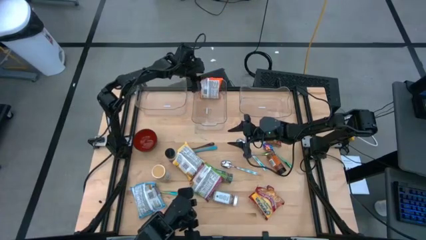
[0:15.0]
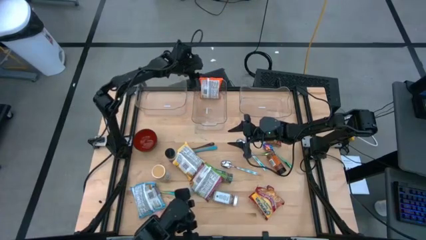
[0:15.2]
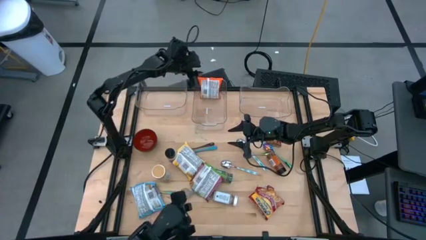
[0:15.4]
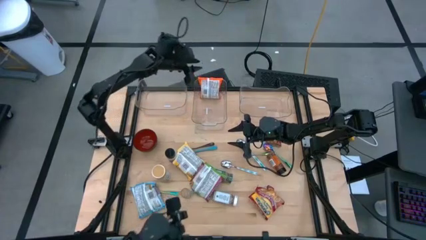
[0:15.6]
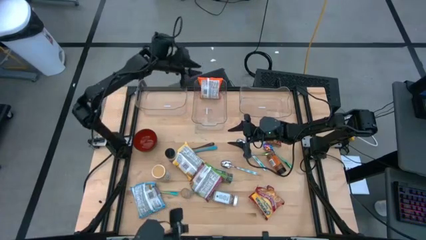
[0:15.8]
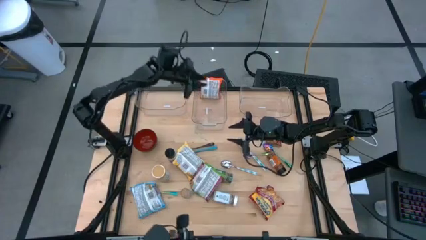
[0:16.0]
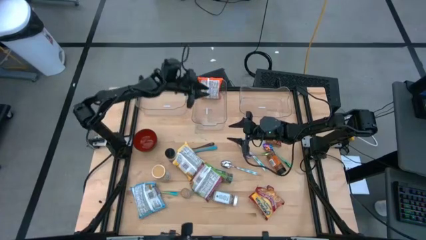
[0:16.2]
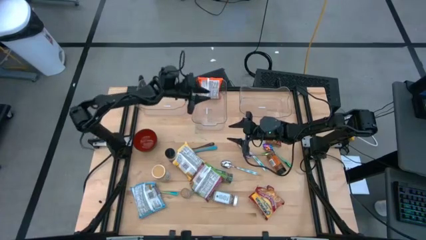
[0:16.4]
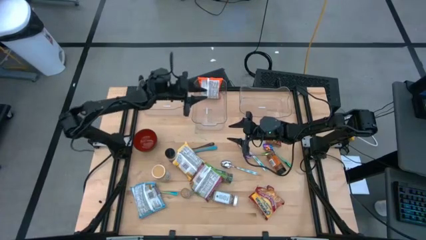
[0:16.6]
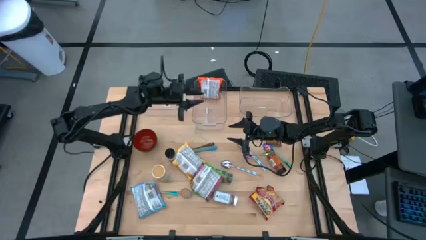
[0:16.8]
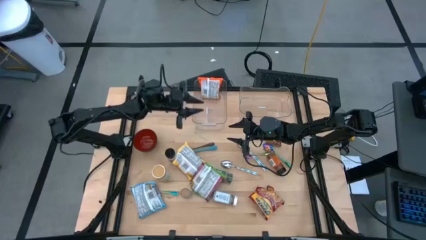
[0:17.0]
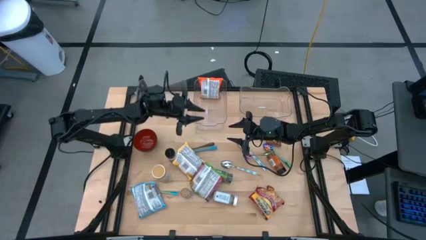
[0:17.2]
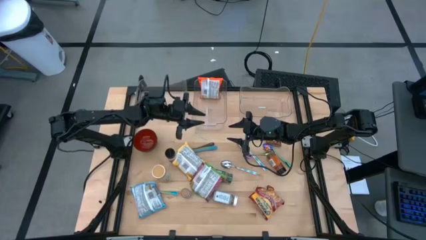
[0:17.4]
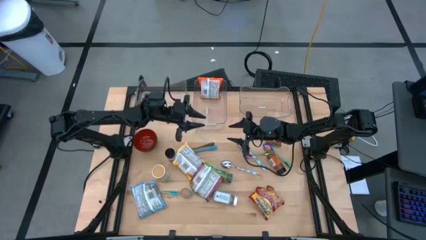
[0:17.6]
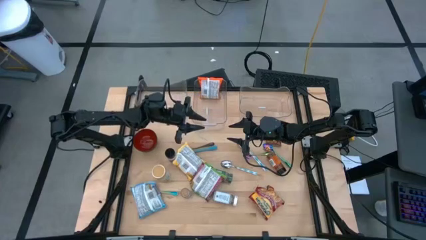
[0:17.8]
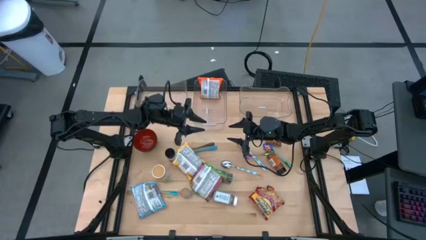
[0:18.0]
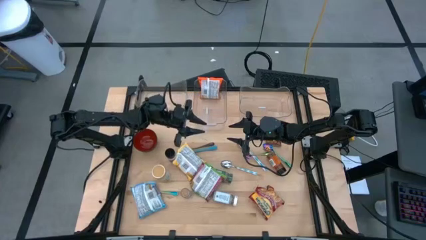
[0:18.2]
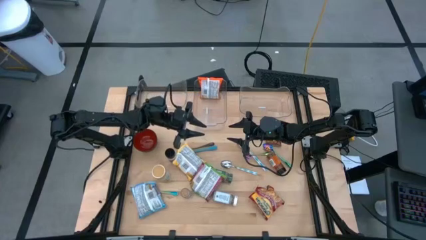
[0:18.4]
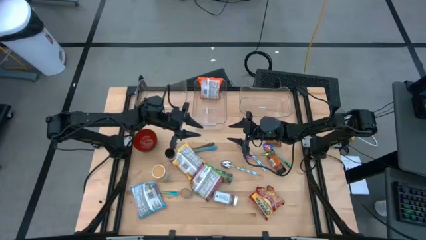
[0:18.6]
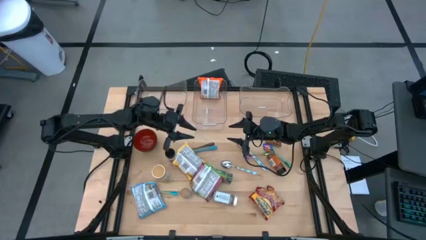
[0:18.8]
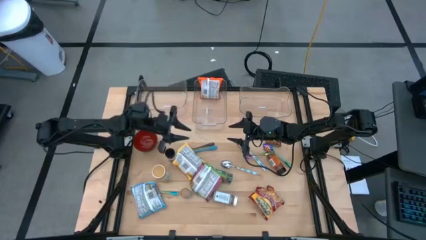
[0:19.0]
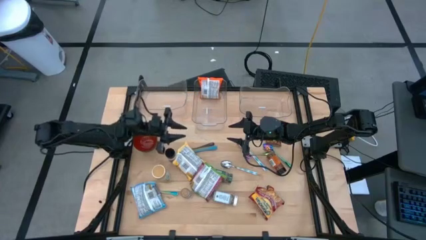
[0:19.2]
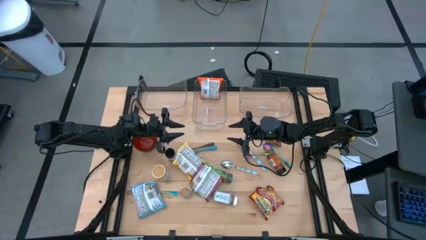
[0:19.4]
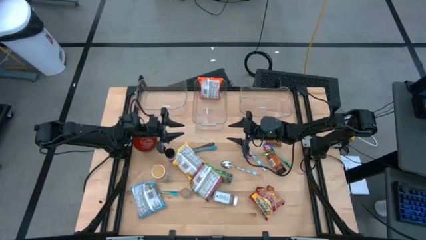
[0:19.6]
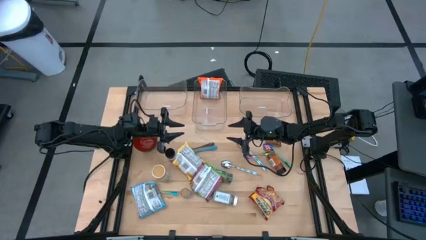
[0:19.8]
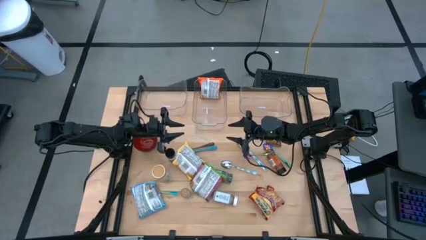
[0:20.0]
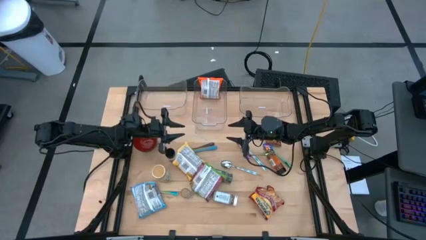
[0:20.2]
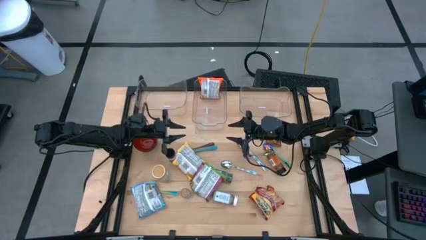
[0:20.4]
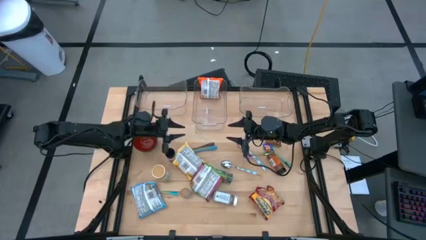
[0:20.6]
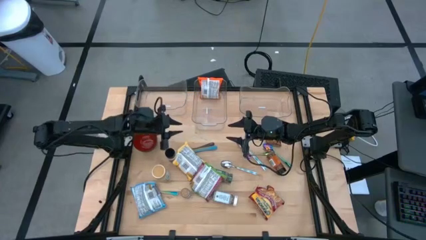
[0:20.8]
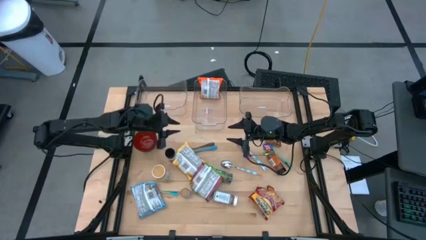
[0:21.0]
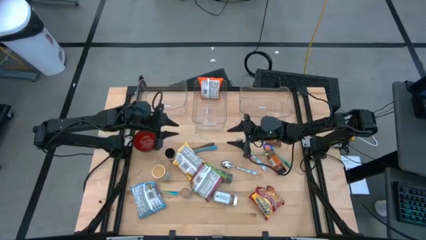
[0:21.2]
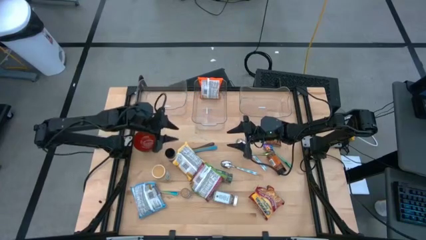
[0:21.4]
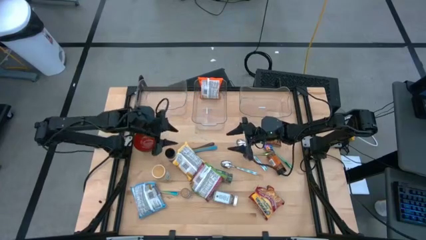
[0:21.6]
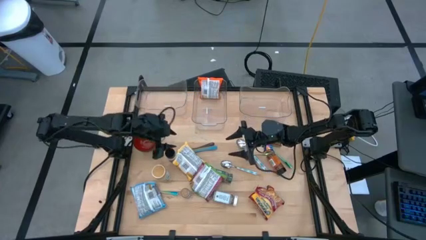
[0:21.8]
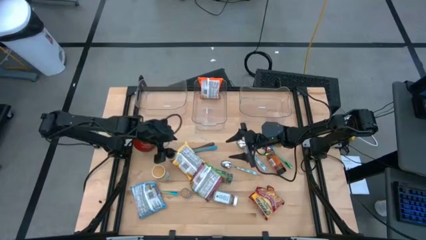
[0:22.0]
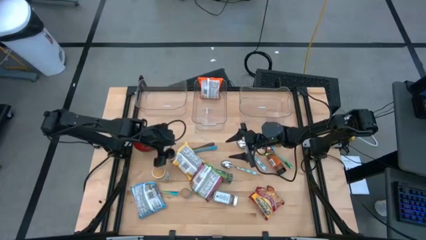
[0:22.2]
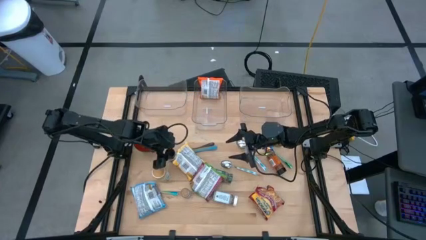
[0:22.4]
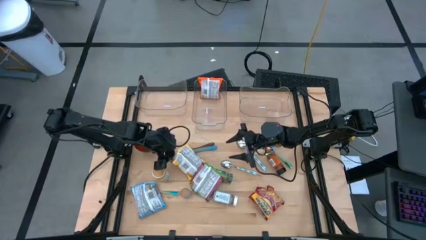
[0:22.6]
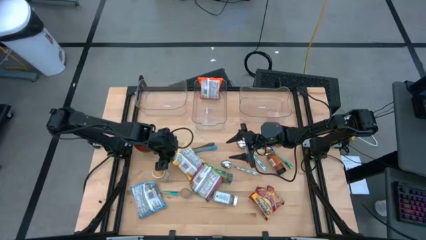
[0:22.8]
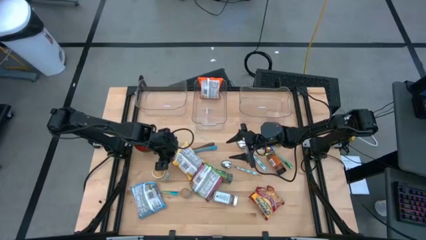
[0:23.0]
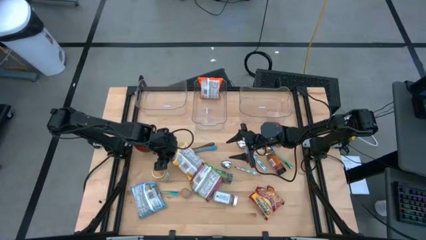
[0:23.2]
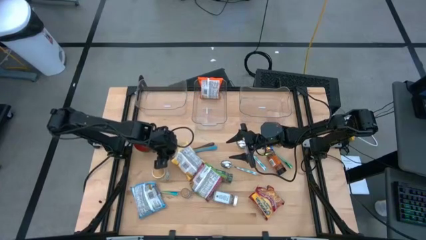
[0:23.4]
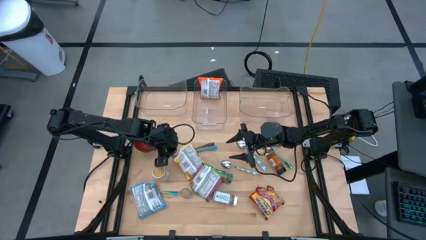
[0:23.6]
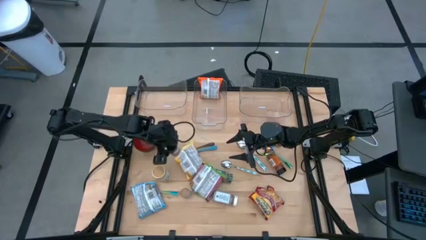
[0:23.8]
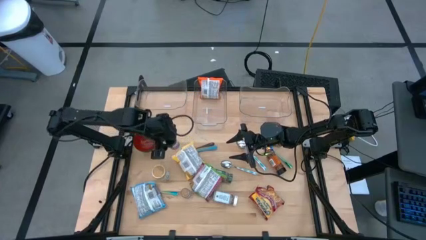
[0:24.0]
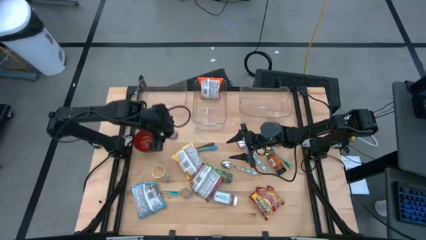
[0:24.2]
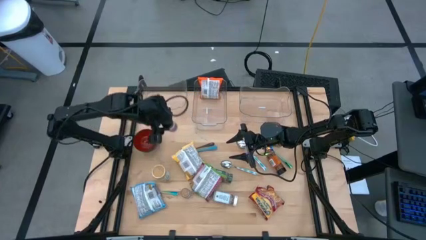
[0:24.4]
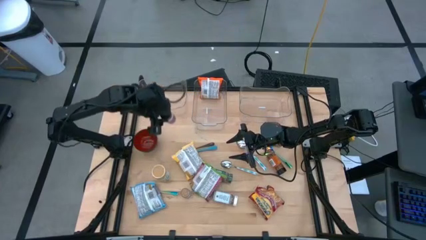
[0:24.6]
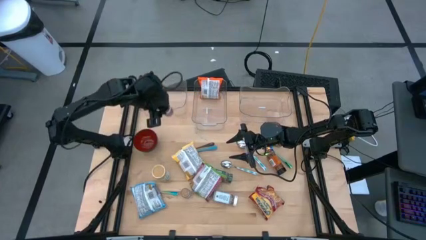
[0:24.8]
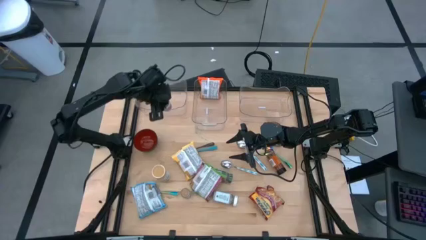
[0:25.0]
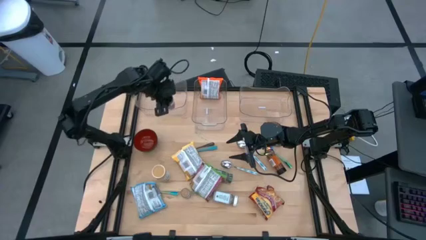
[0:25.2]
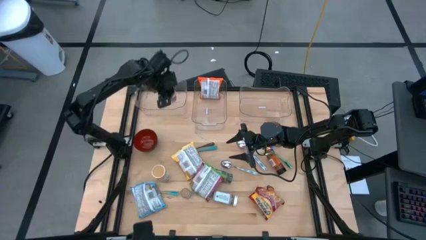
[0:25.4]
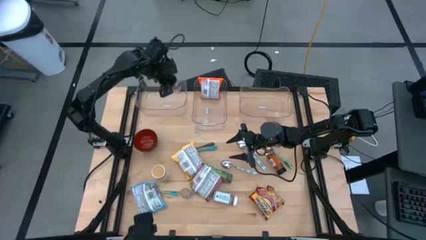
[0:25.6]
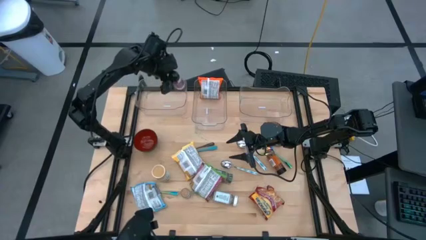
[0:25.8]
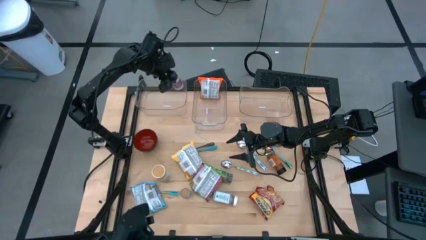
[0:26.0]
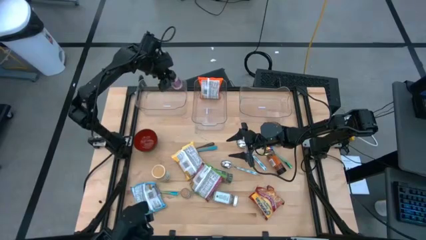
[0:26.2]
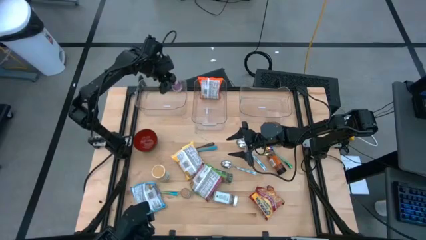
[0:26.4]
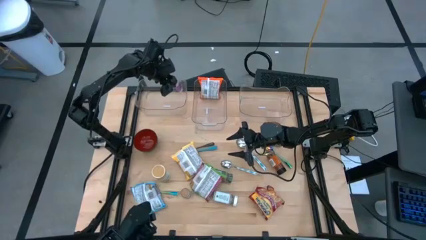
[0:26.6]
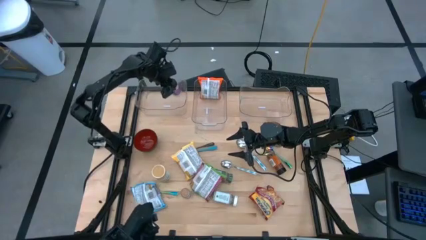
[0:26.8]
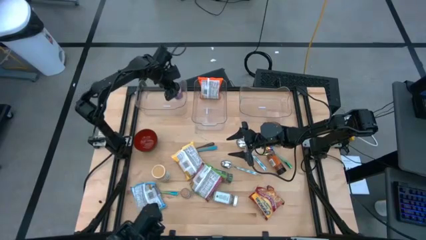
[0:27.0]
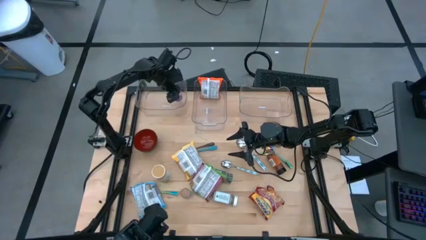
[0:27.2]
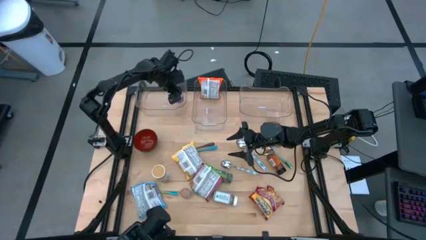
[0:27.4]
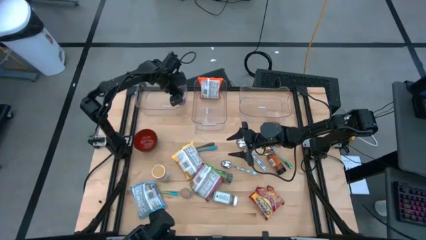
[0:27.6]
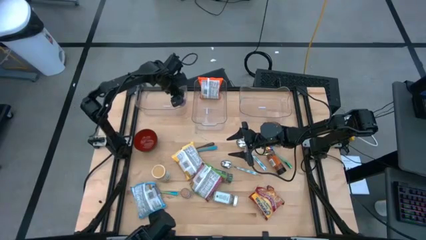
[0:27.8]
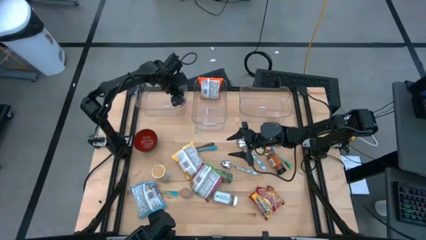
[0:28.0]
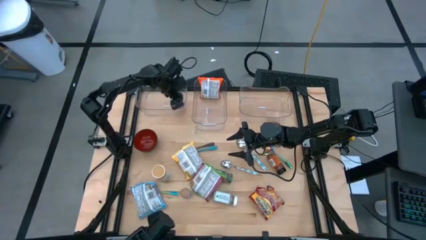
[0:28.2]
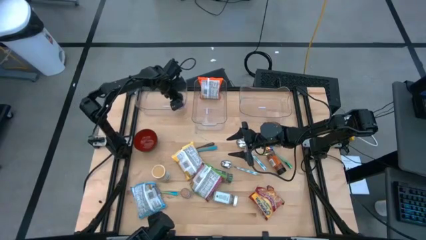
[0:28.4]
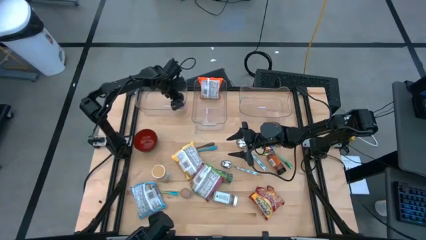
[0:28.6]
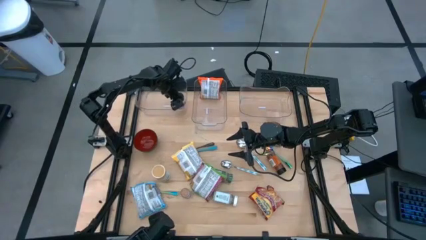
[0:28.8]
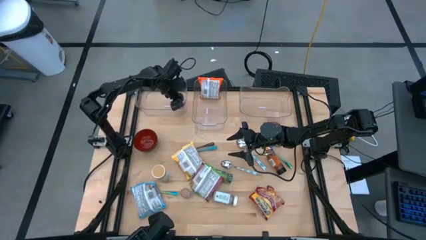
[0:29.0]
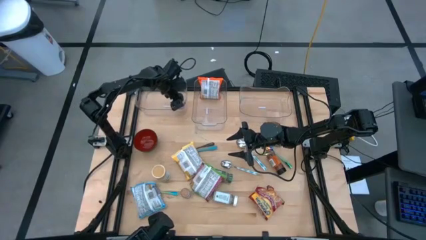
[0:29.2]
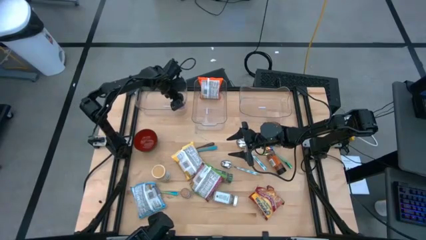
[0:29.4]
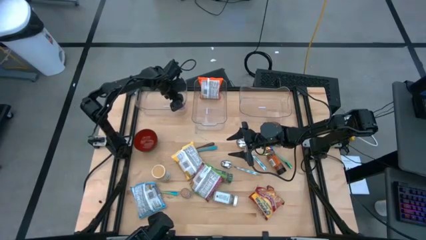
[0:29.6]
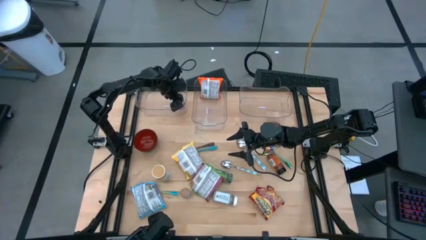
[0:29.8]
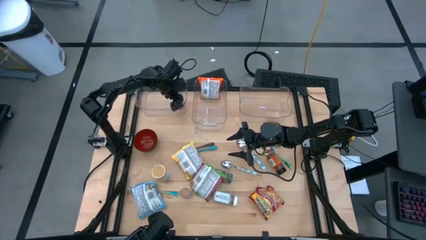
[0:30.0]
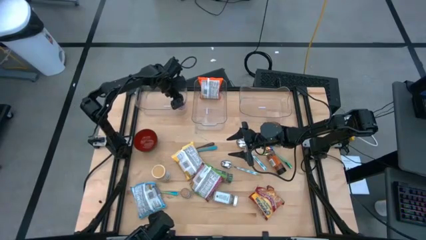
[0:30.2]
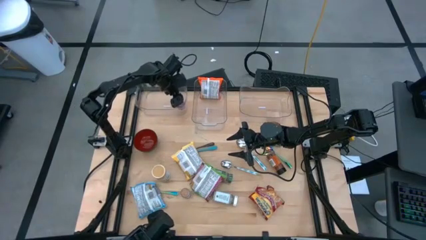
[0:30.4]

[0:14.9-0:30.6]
Task: Pick & Place Food Item
Put the purple seasoning bottle into the left transparent bin

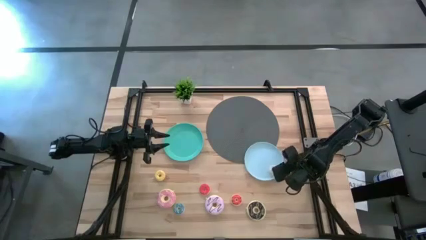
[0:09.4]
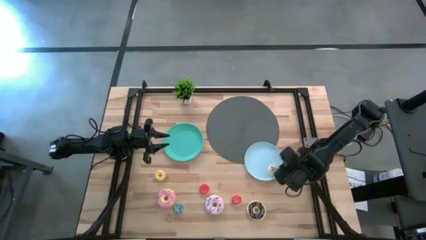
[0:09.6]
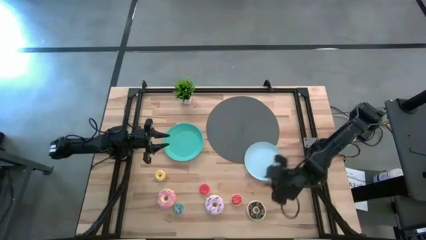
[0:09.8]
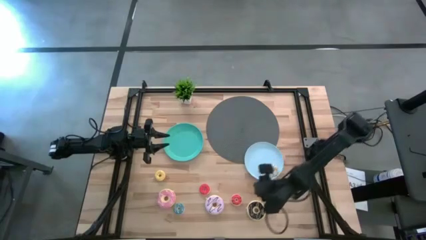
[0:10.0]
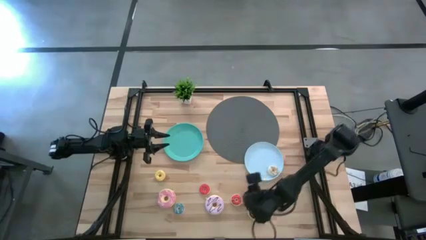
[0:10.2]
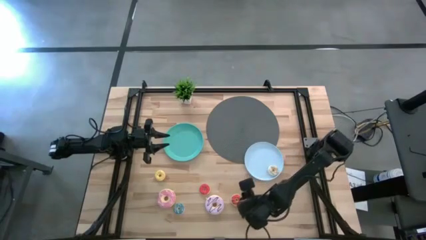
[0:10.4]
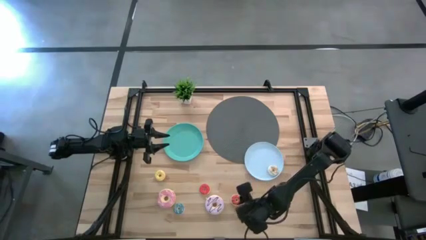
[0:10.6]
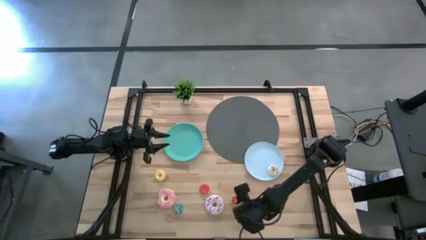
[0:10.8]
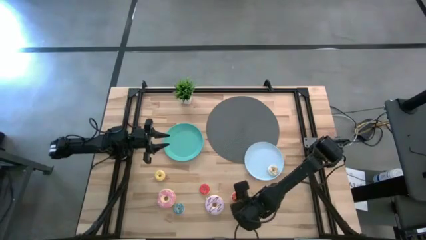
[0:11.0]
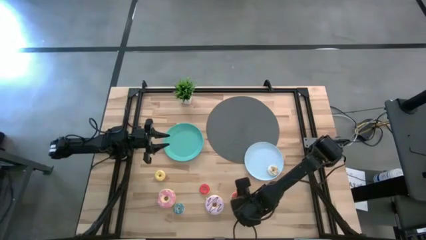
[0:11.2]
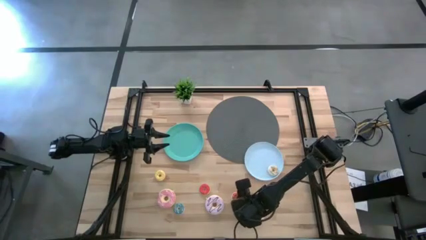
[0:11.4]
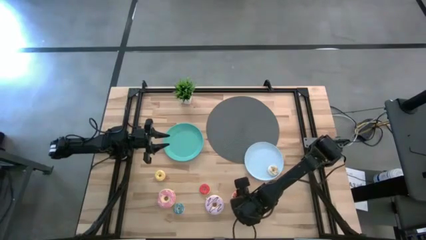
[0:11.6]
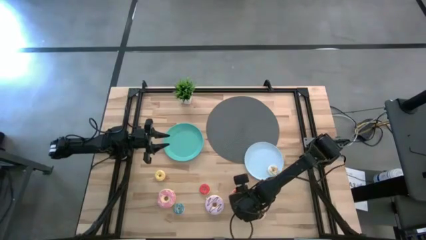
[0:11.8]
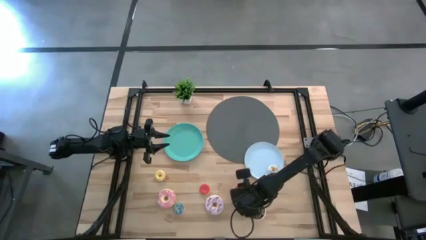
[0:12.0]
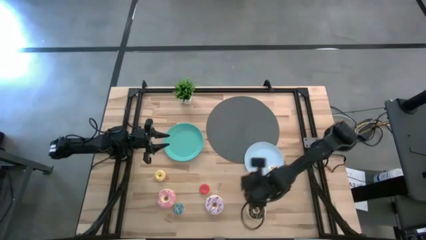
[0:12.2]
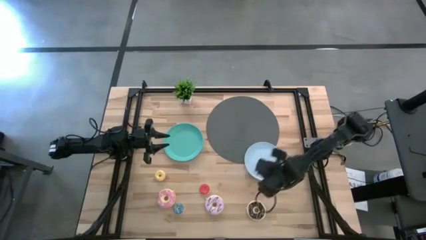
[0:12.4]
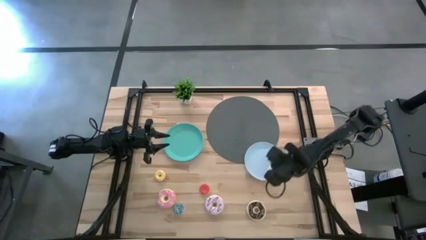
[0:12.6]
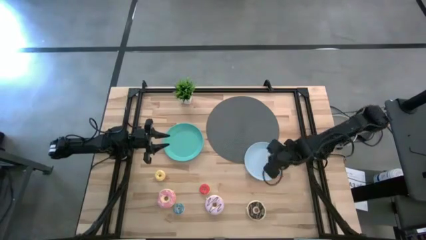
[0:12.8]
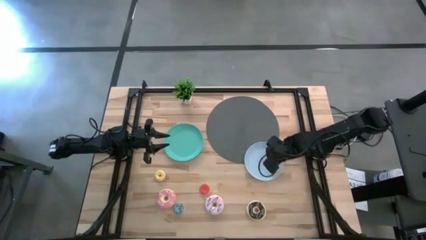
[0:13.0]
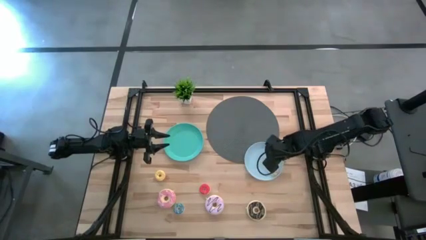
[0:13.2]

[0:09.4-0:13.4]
Task: Pick & Place donuts
Put the small orange donut on the blue plate
